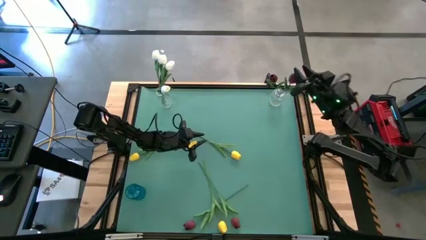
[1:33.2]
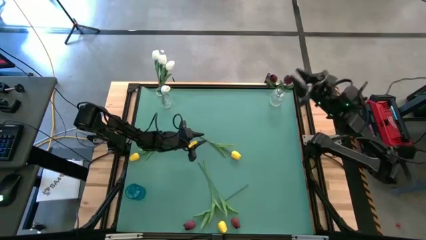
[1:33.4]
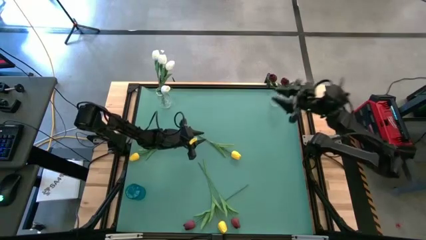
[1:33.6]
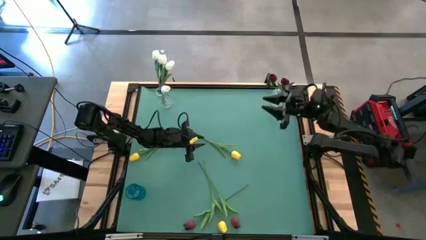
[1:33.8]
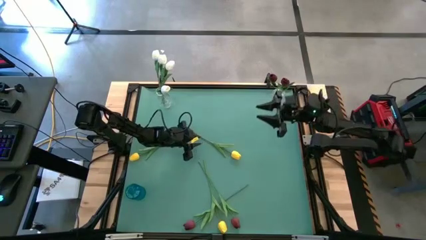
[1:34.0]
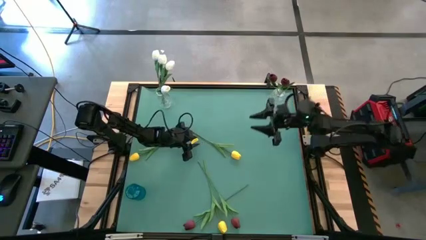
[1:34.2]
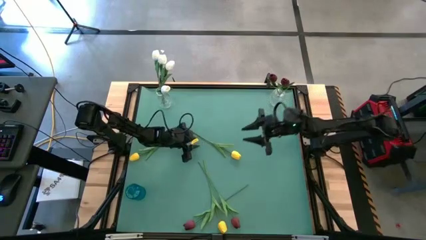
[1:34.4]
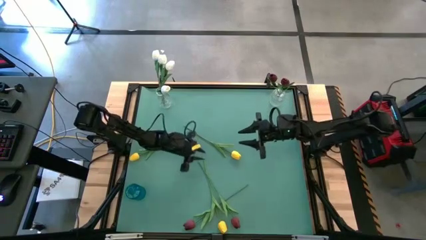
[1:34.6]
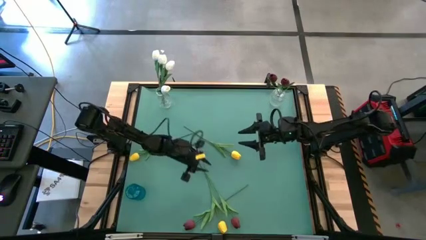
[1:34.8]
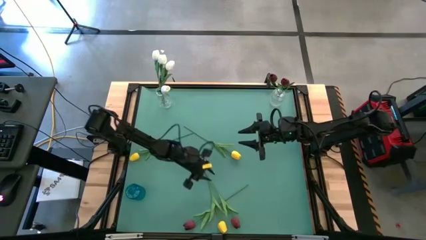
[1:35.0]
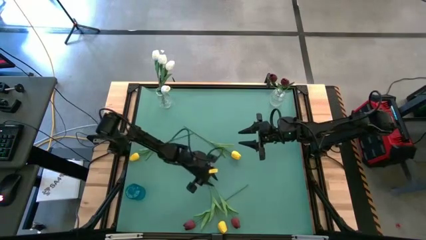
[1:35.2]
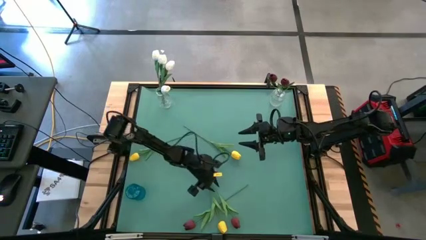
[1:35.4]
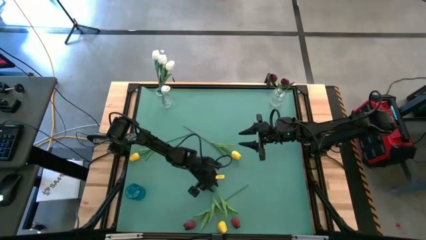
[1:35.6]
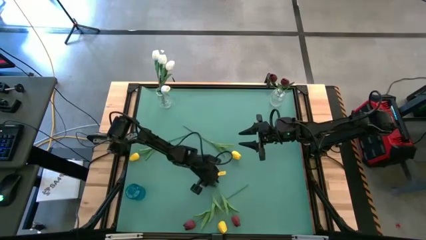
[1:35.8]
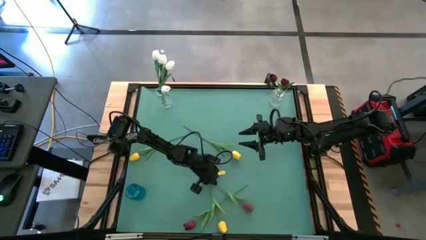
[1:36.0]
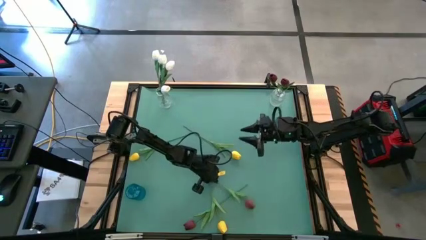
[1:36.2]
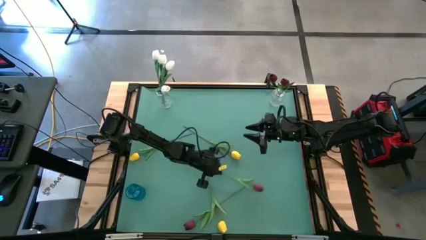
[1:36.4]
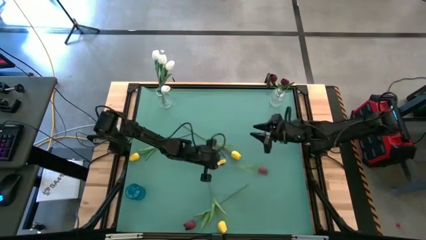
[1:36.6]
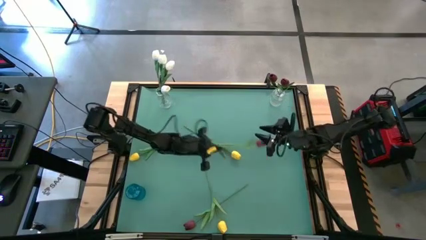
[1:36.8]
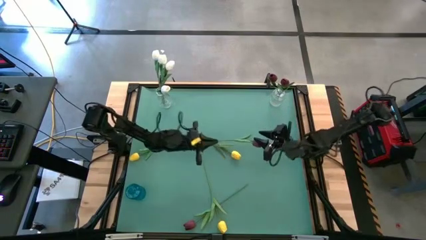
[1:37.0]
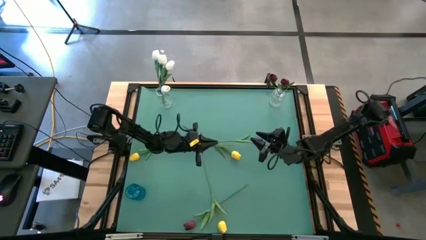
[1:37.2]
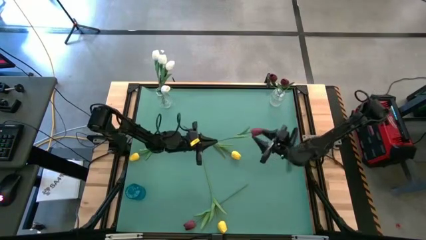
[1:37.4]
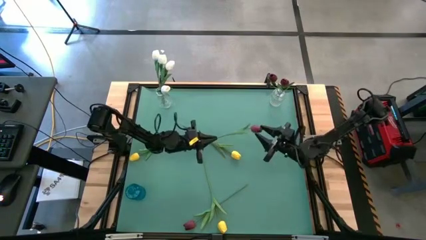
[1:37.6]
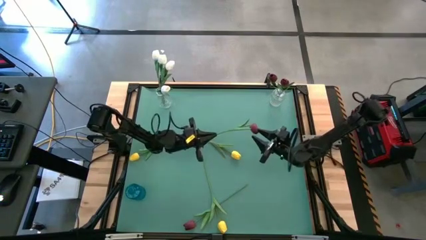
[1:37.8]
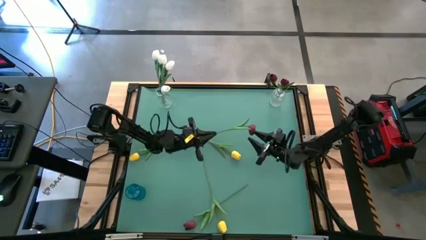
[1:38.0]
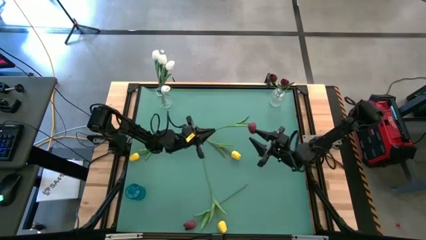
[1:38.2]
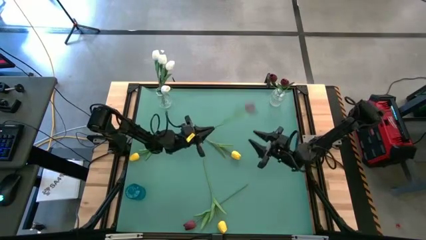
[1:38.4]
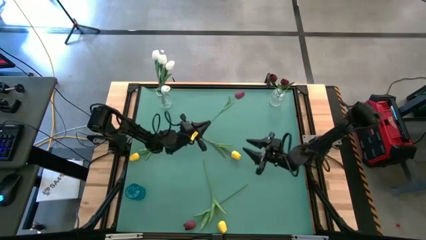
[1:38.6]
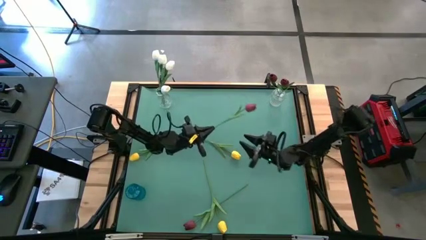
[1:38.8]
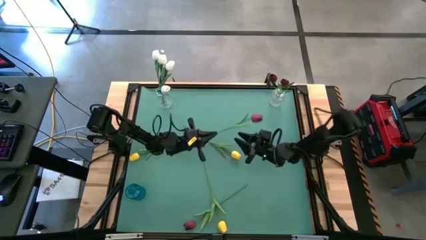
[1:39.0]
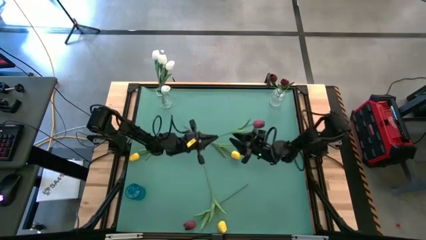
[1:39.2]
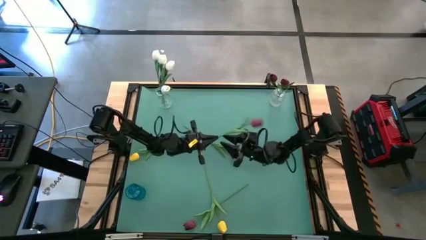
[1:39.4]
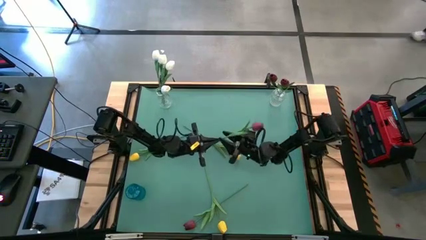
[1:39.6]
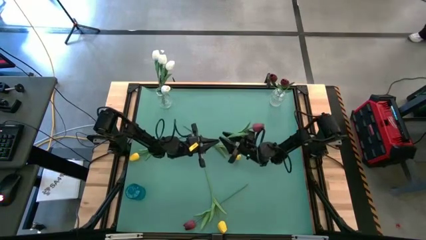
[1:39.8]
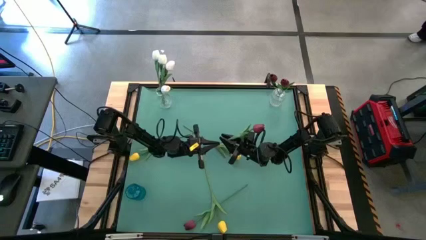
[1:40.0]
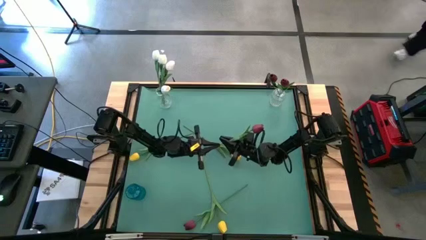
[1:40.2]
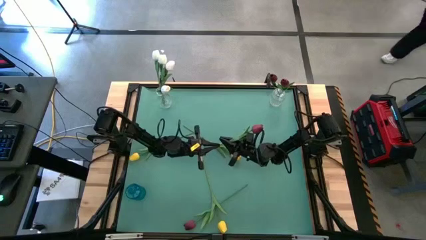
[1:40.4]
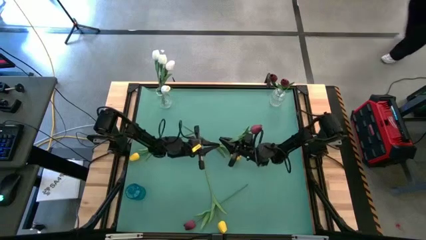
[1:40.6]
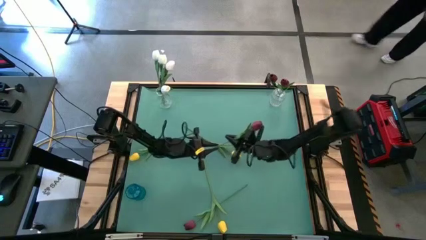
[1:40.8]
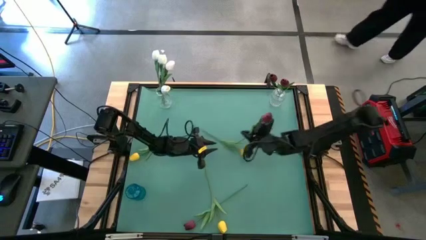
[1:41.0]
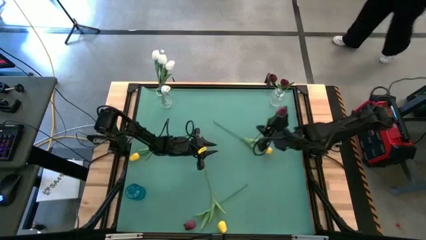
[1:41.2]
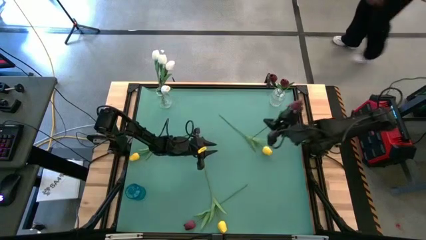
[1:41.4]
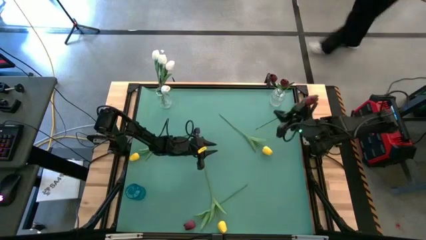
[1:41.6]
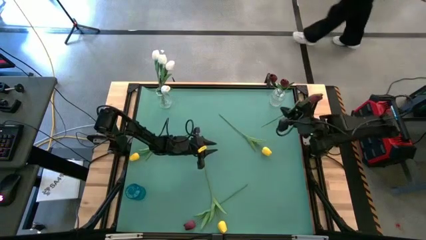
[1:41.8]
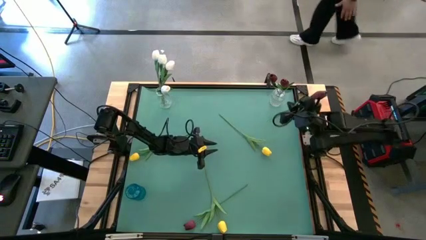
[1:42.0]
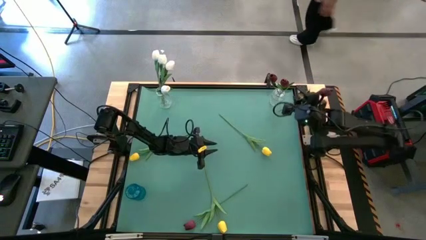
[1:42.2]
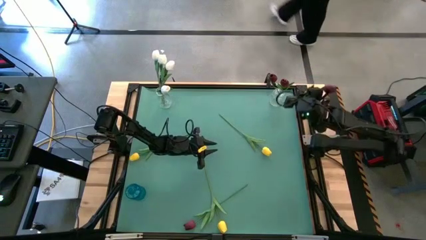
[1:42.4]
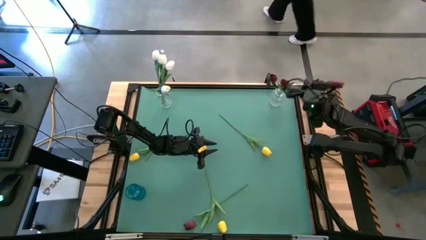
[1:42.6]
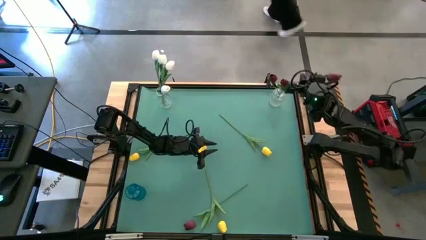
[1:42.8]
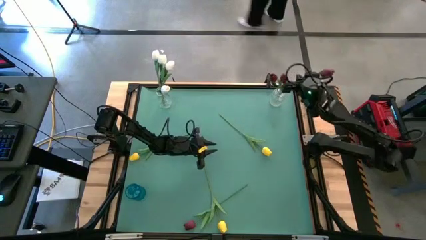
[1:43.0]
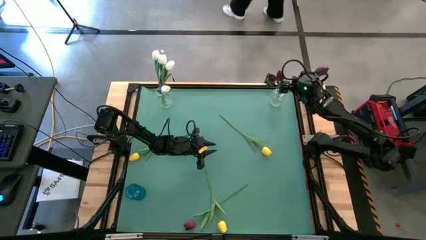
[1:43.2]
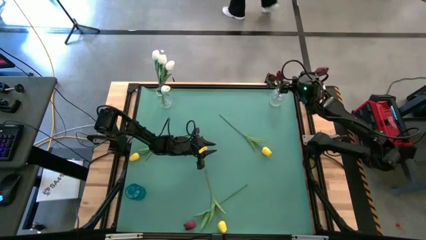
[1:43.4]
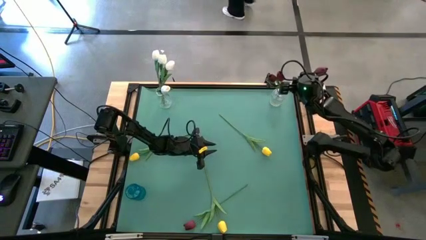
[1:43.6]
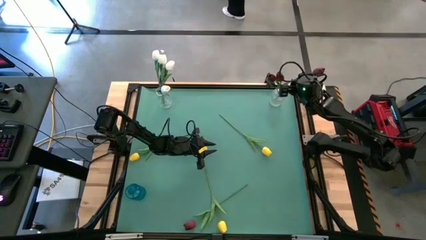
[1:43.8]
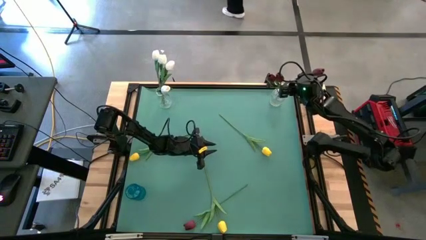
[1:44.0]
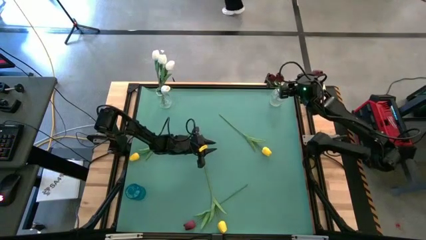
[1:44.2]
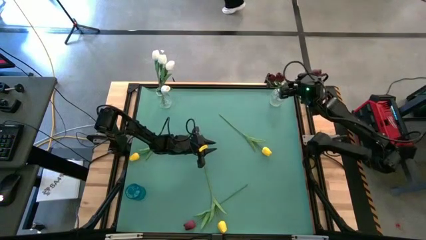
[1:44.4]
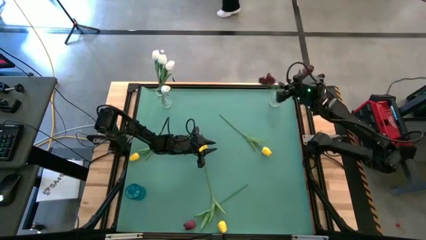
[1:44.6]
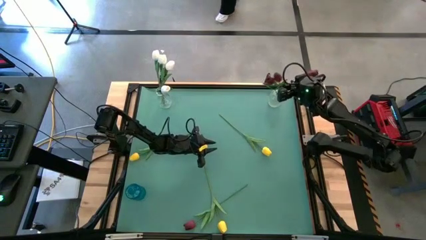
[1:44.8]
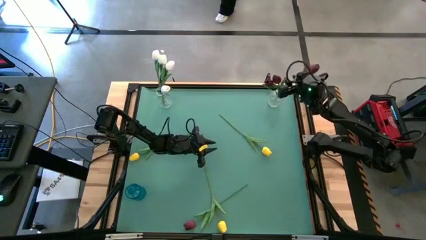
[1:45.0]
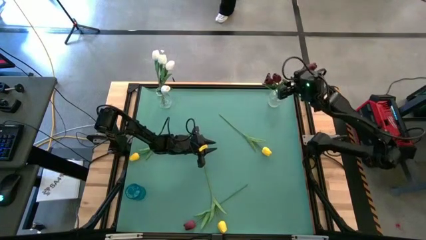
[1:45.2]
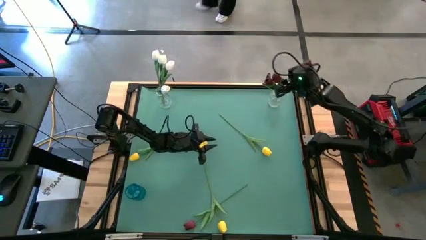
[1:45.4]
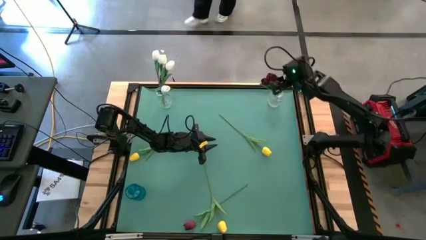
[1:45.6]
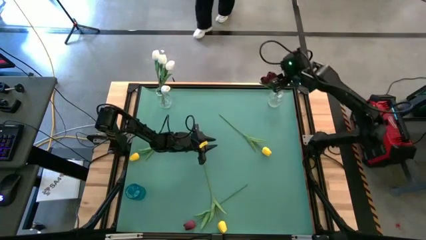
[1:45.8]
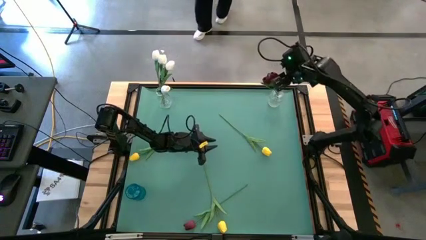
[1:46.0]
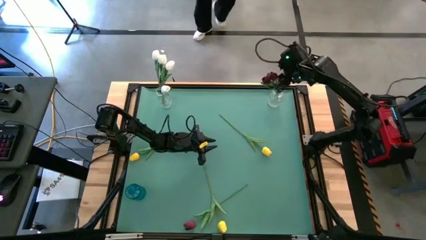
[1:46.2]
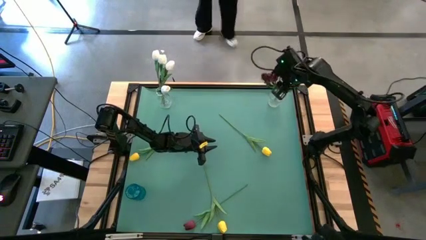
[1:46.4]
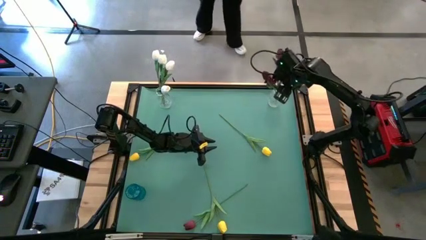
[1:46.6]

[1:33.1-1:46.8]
Task: Sort flowers into vase by color
Put the red flower into the right transparent vase

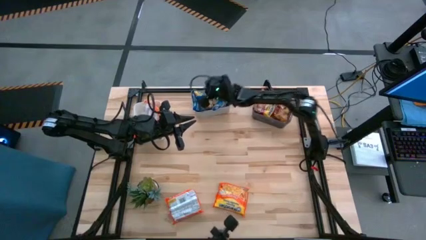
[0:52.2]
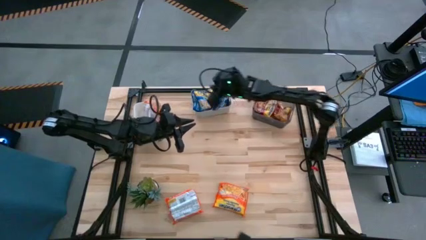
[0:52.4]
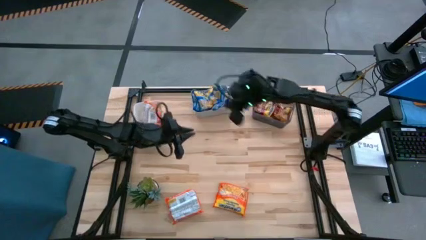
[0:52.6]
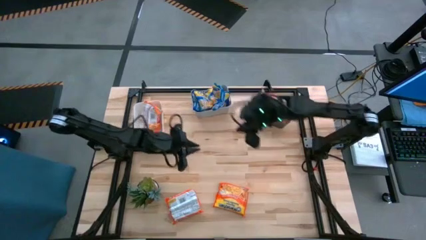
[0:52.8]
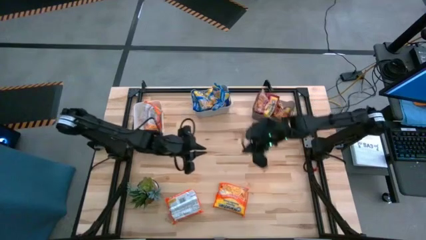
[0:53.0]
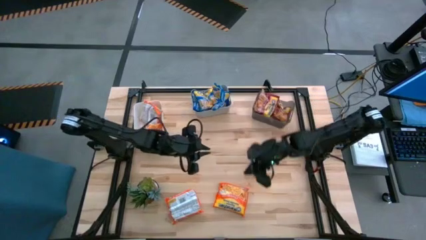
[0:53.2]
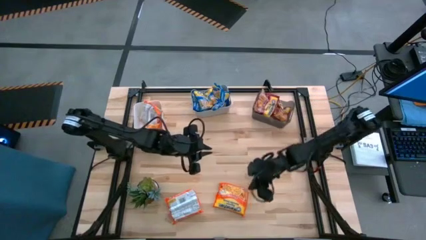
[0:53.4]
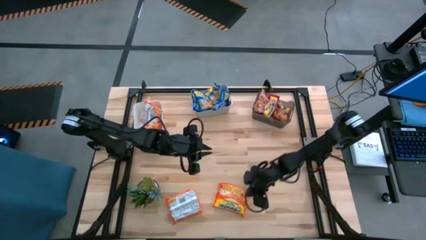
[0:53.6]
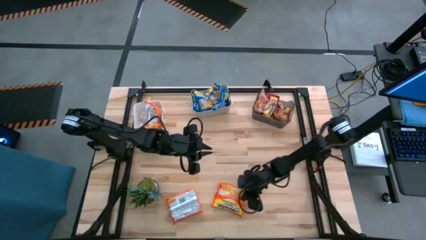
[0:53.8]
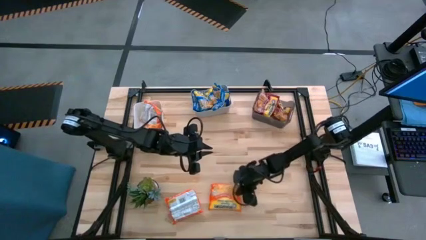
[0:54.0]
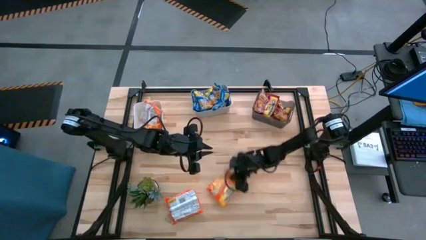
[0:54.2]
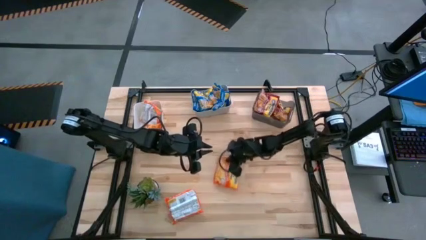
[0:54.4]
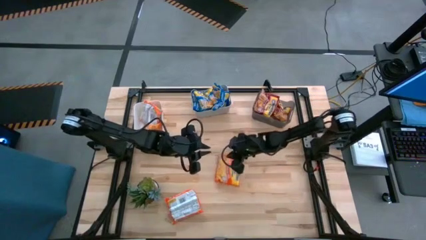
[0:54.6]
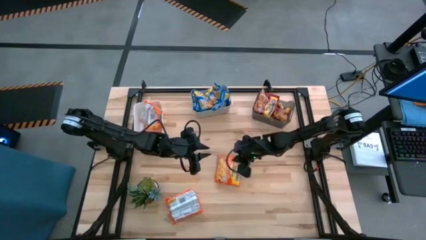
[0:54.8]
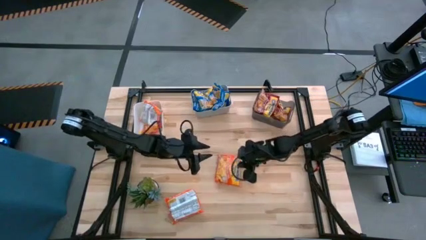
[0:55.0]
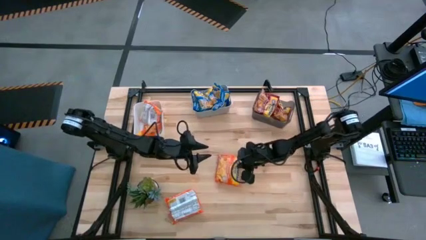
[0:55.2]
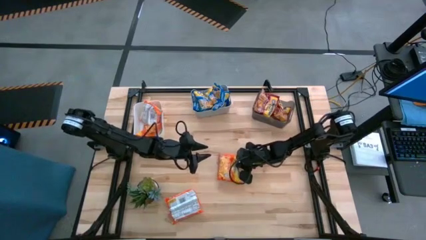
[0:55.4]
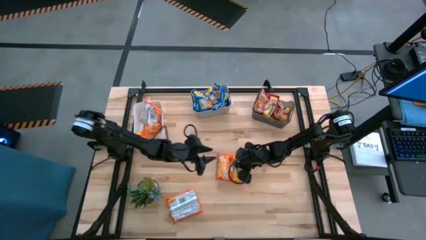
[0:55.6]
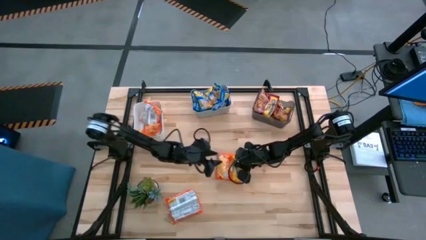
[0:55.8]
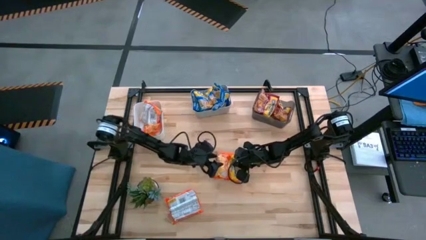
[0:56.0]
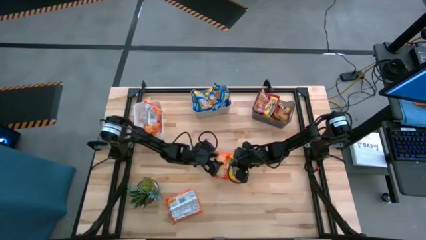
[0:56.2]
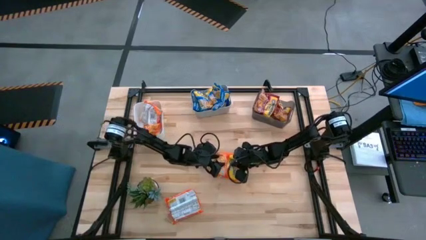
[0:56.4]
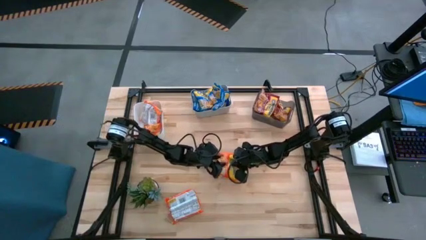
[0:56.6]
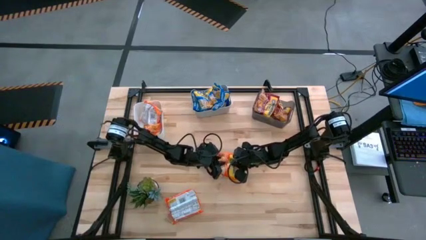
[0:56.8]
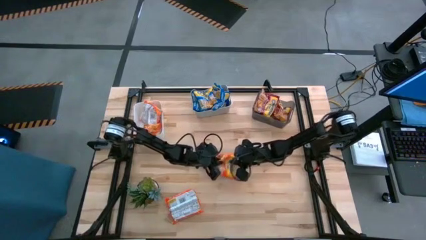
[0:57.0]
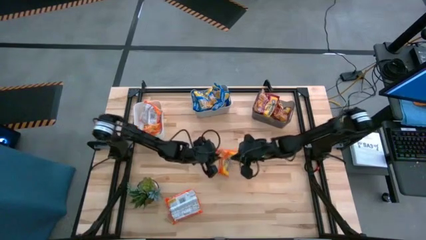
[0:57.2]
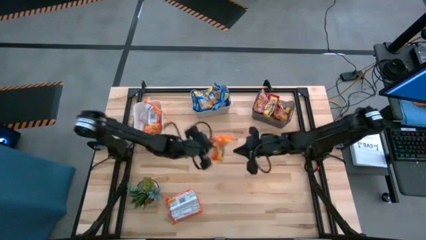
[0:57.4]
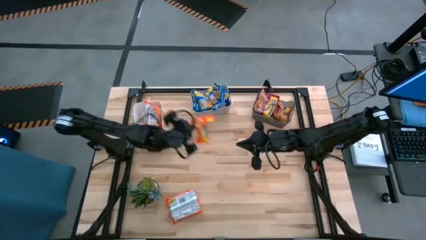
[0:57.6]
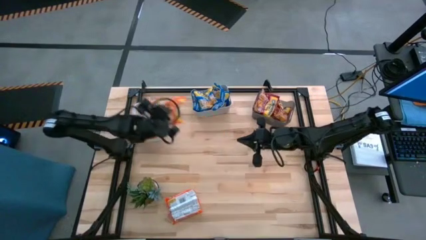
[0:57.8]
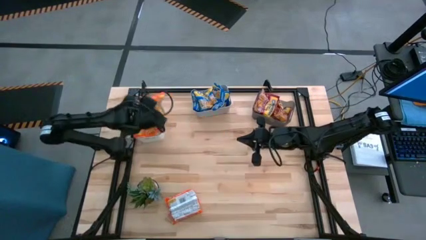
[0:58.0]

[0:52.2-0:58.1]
Task: Sort Maruchan noodles
Put the middle orange noodle pack into the white bin
